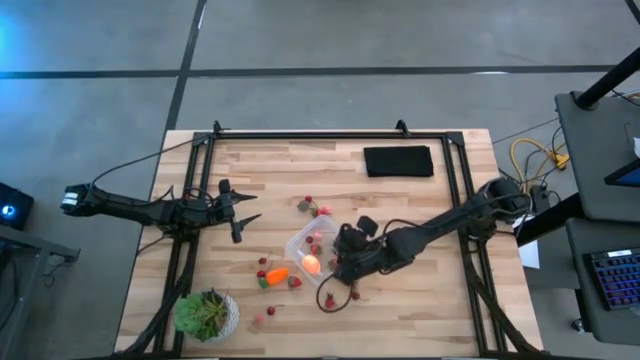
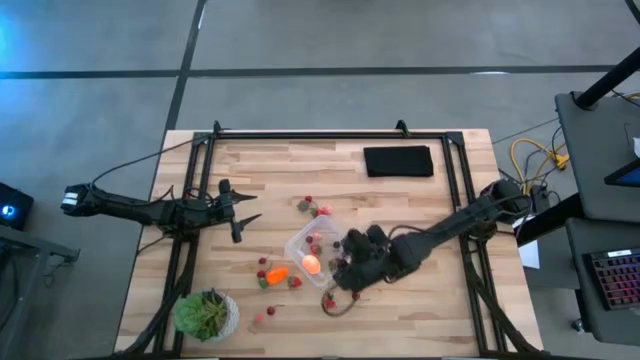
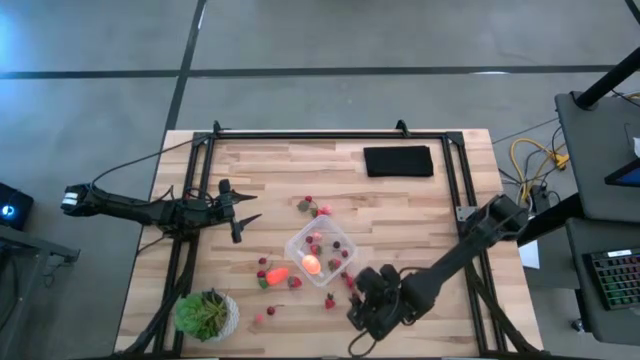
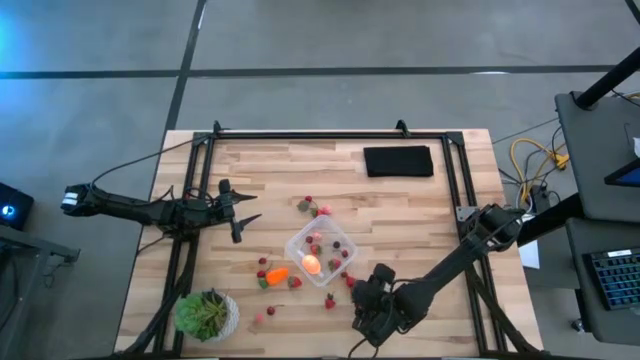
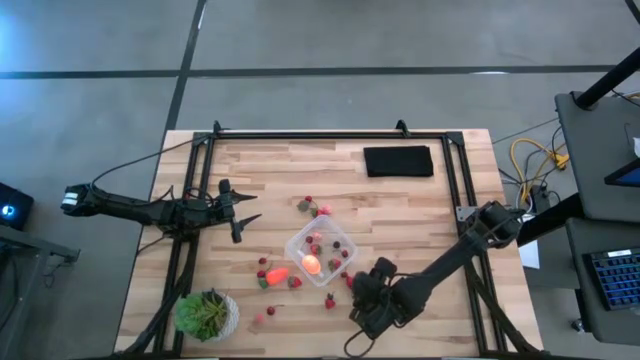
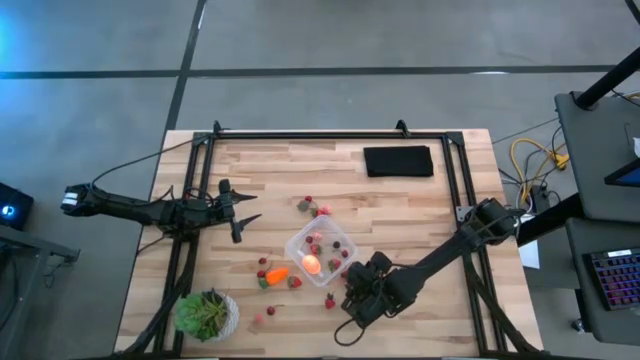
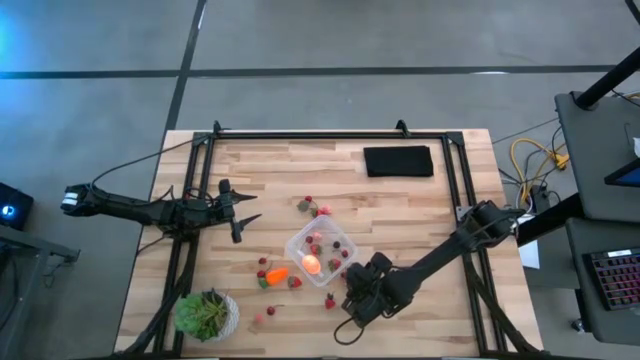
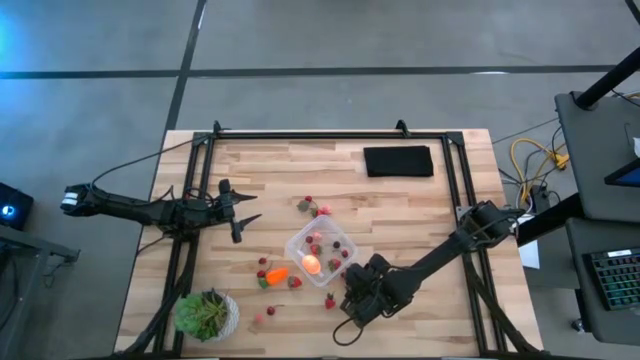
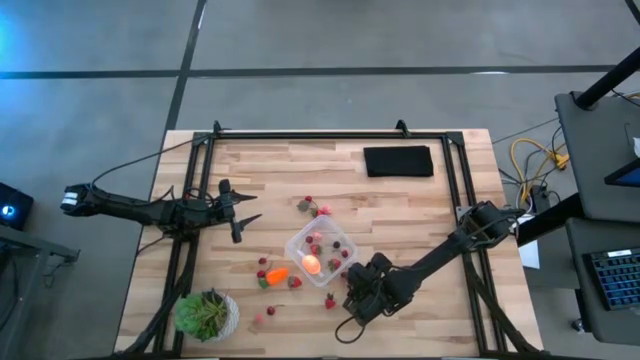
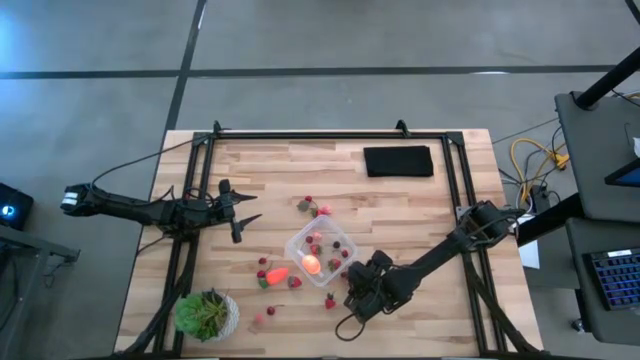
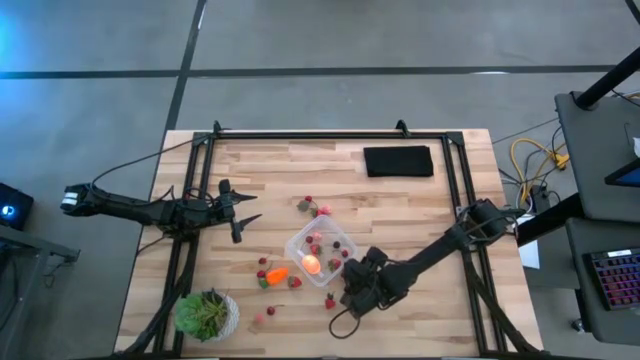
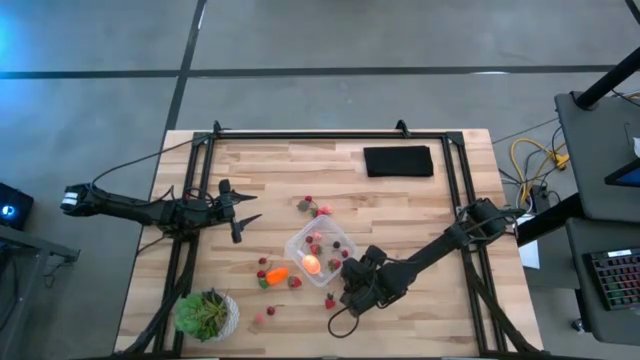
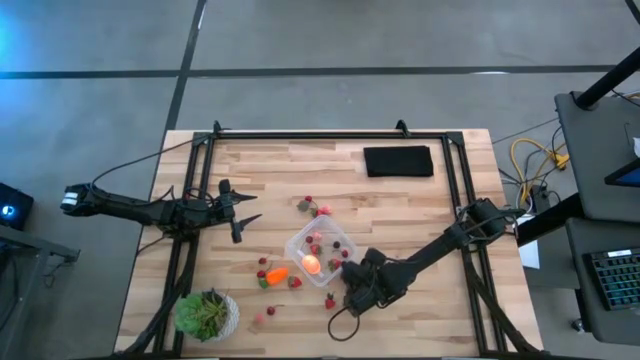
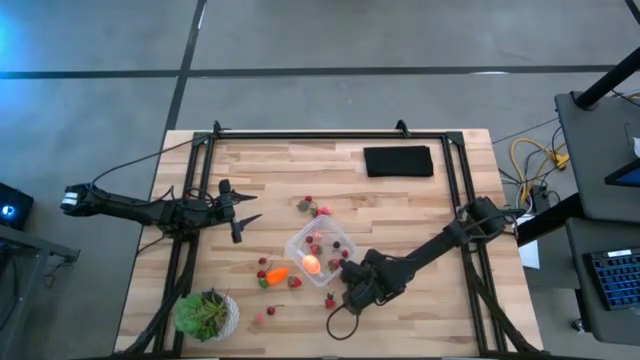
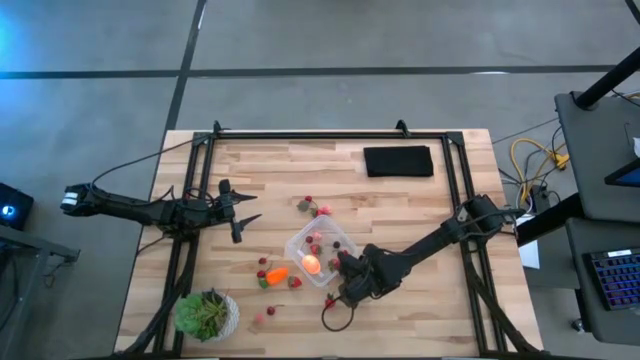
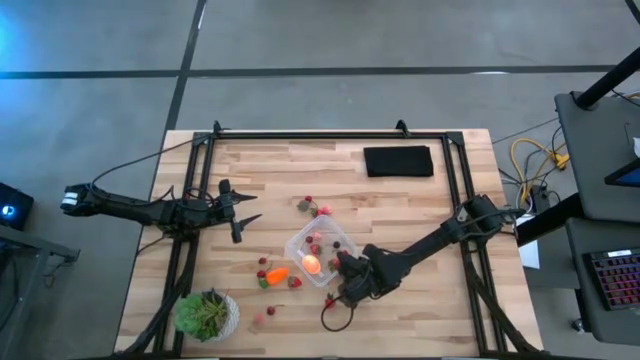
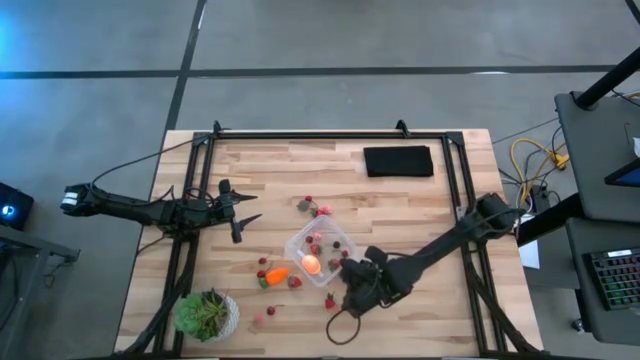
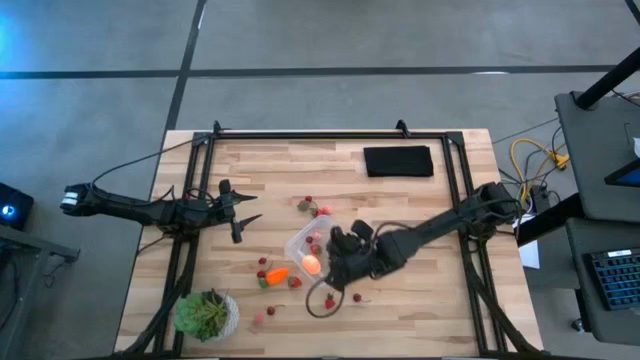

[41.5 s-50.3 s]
Task: Pick and placing Produce into tupperware
Put the red strawberry into the transparent container

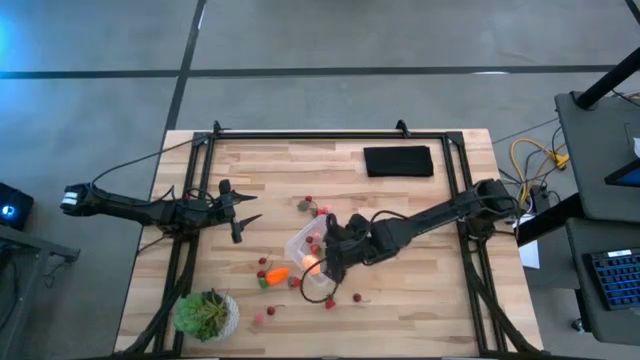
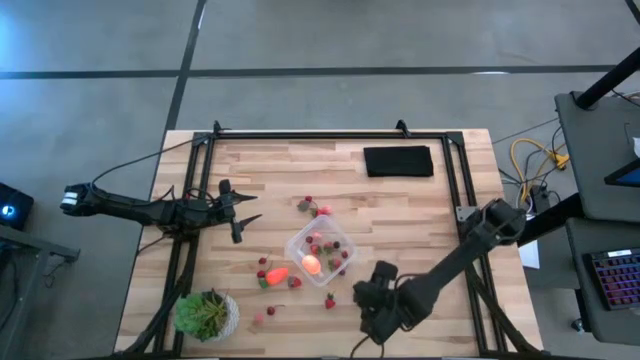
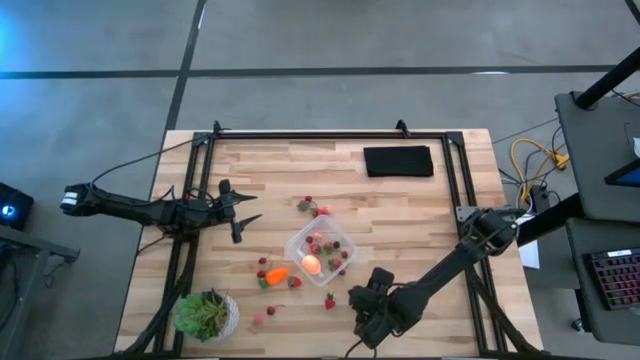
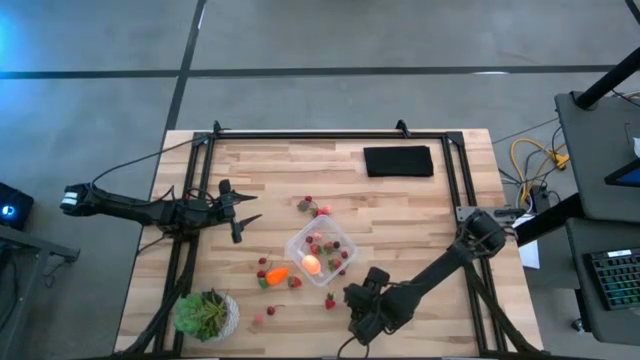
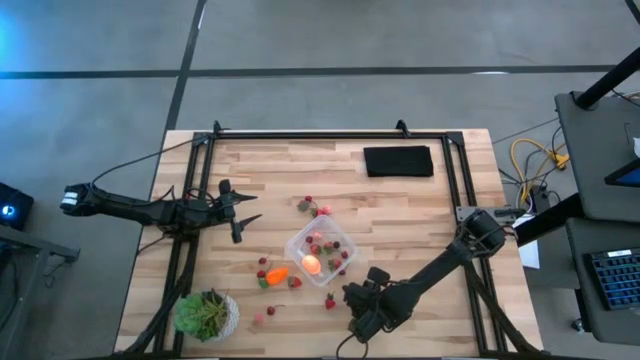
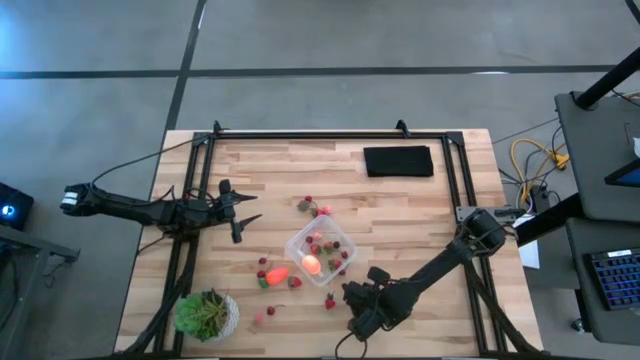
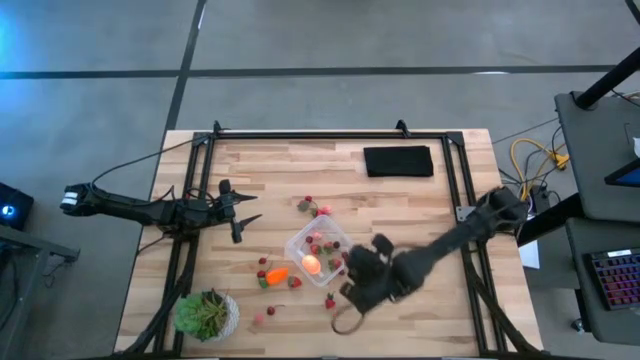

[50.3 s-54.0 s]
Put the red cherry into the transparent container

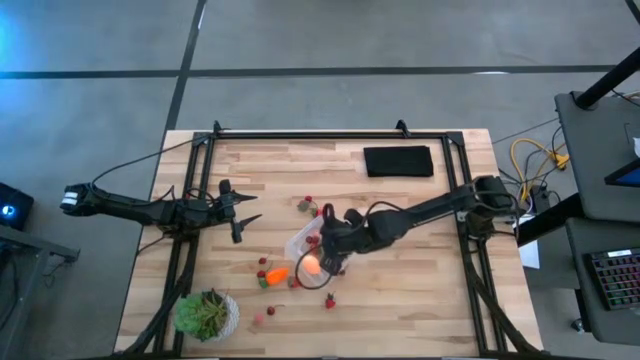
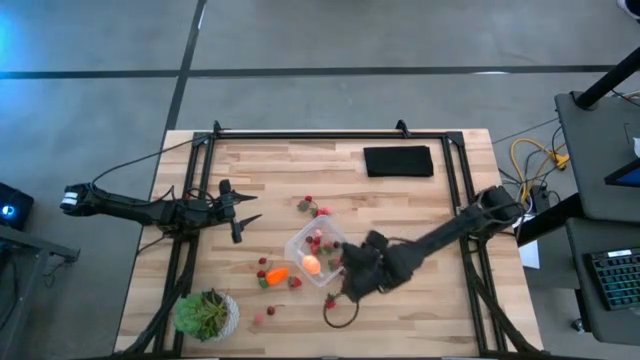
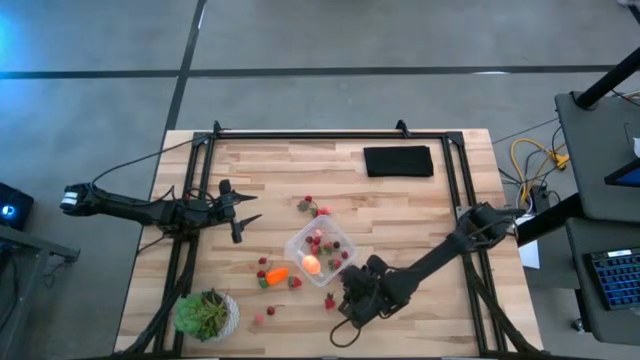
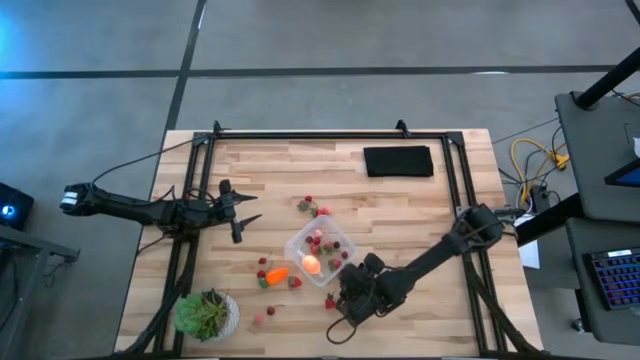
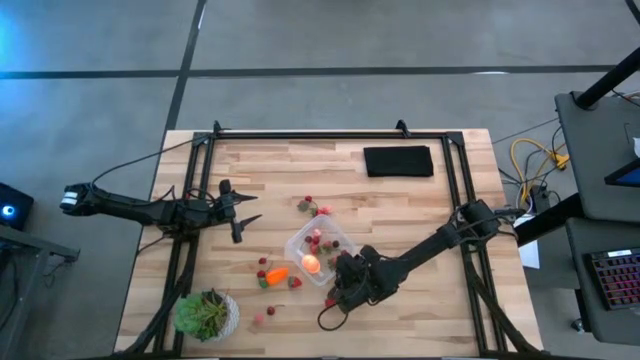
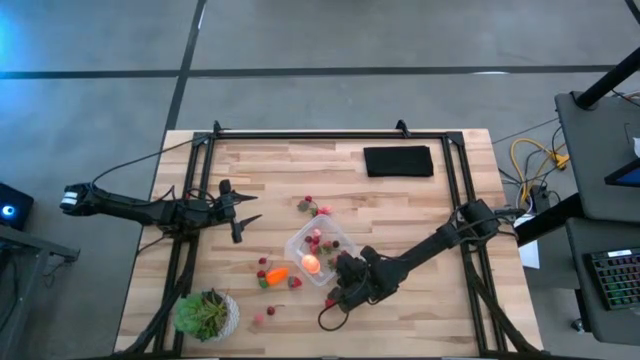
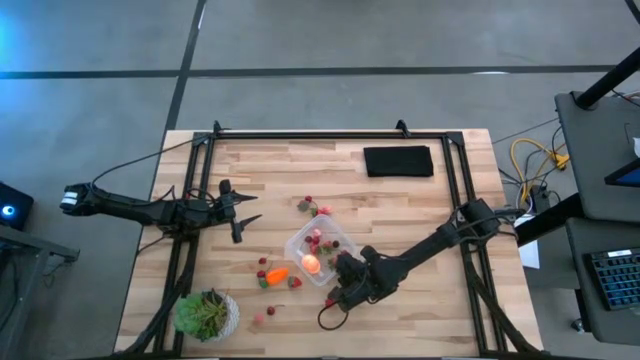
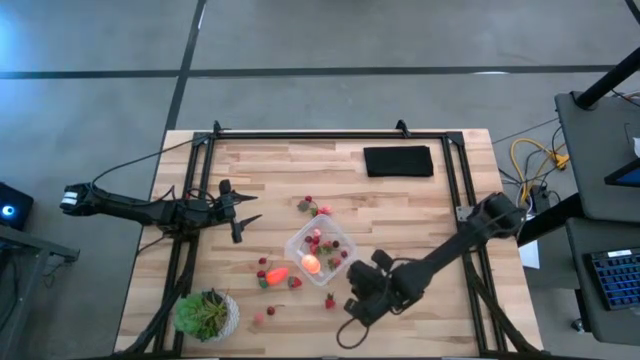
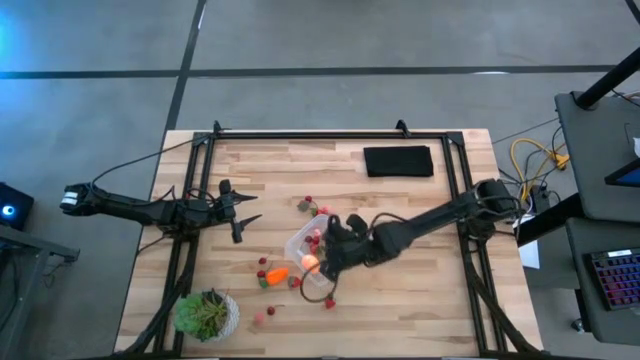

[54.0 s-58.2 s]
Put the red cherry into the transparent container

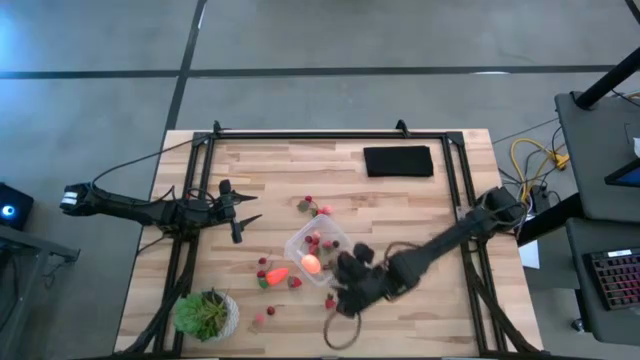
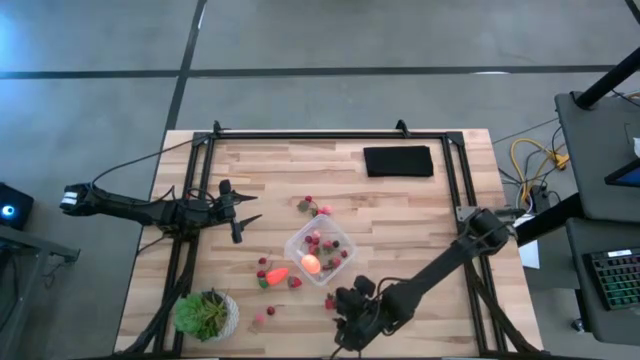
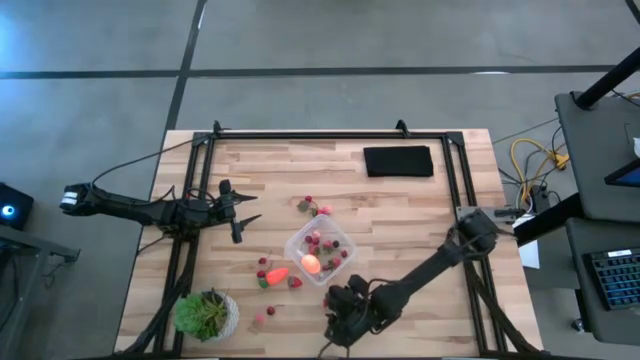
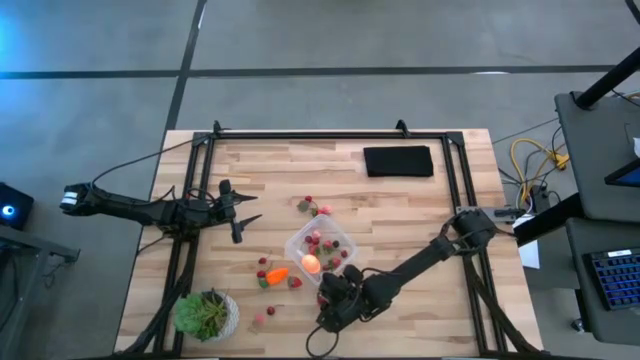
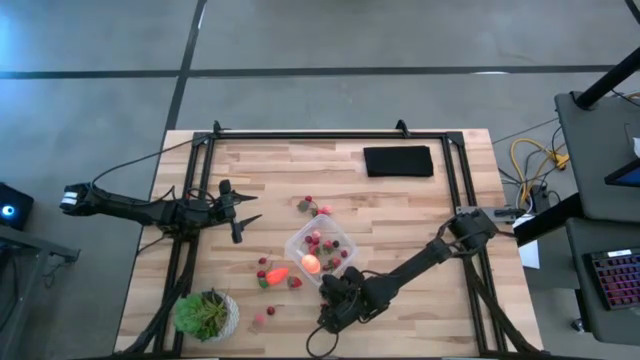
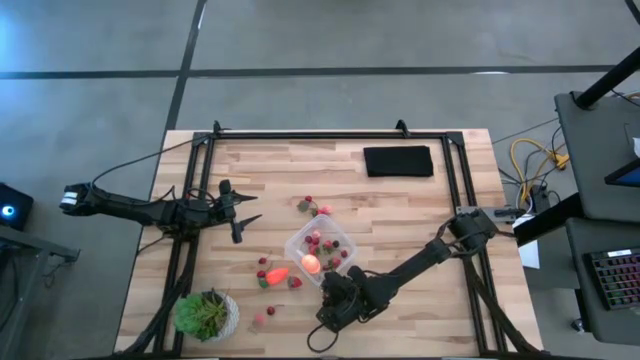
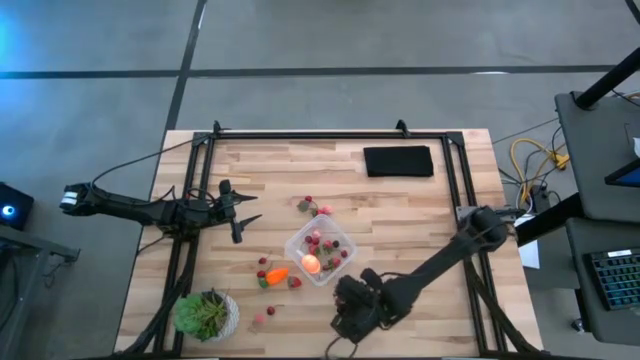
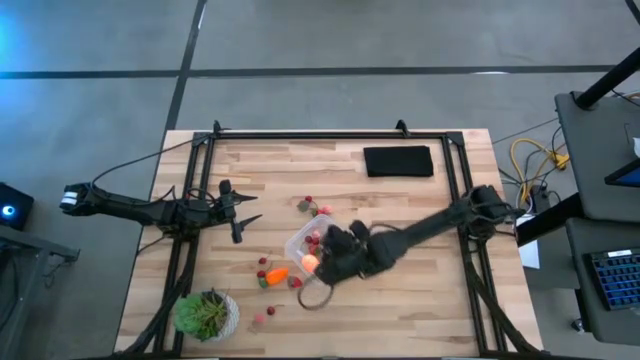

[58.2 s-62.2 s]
Put the red strawberry into the transparent container
